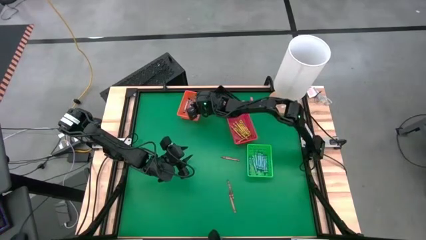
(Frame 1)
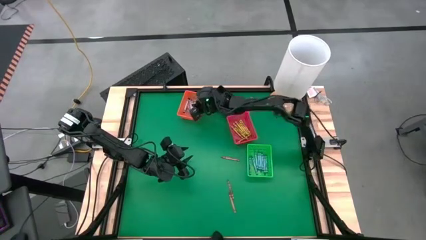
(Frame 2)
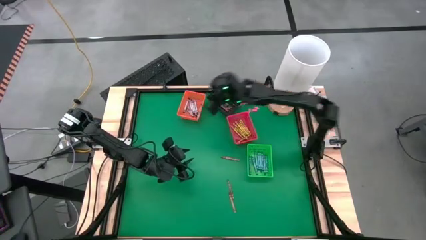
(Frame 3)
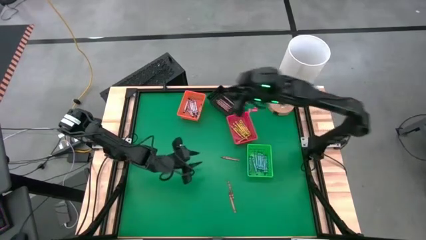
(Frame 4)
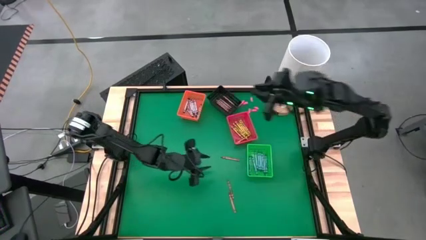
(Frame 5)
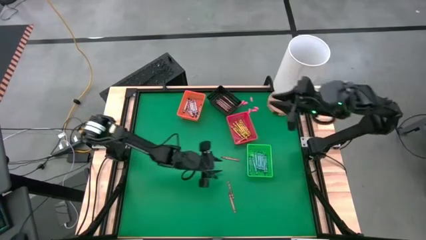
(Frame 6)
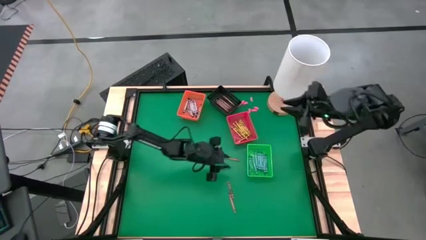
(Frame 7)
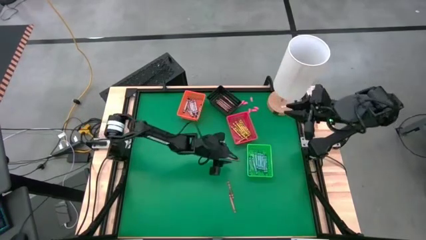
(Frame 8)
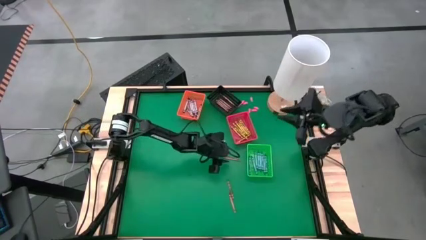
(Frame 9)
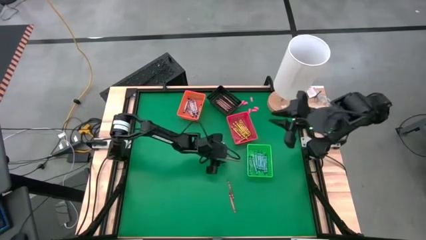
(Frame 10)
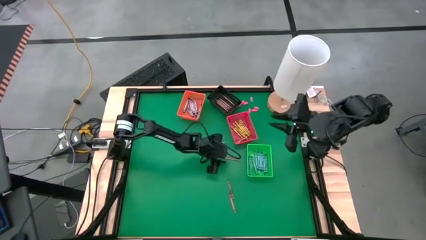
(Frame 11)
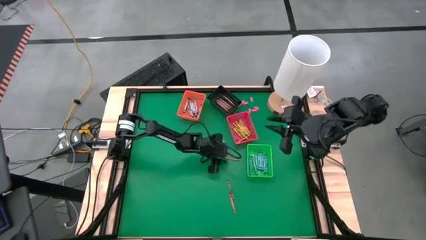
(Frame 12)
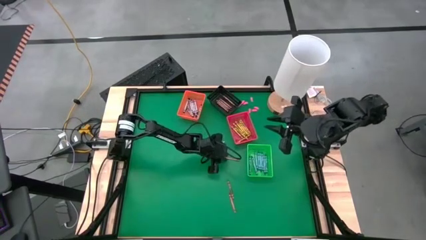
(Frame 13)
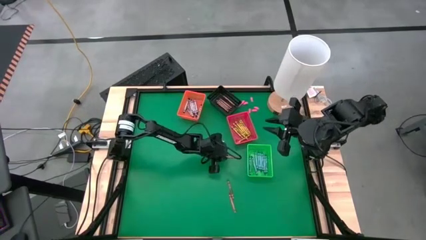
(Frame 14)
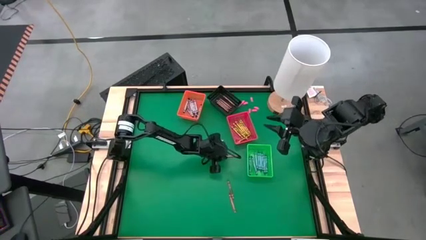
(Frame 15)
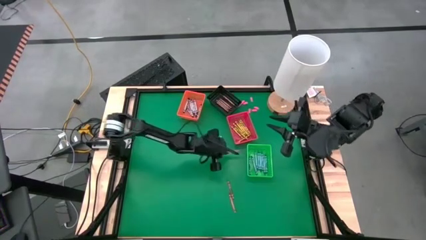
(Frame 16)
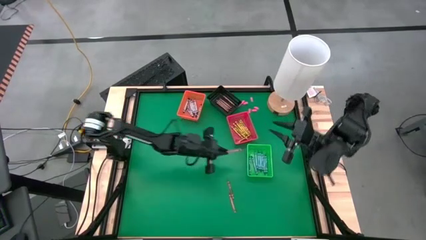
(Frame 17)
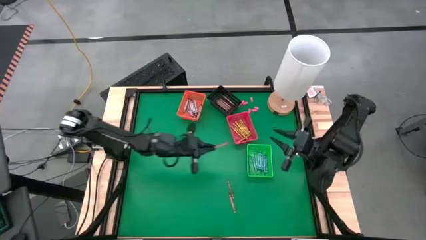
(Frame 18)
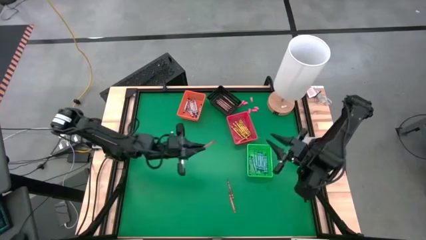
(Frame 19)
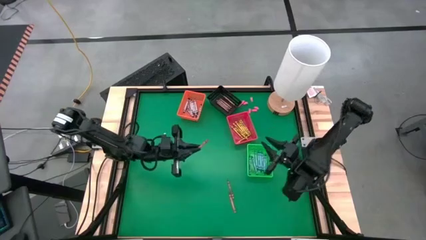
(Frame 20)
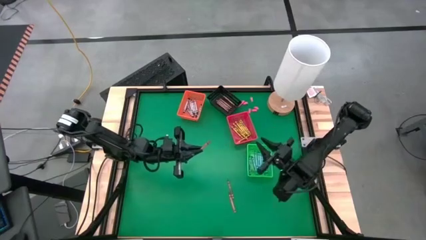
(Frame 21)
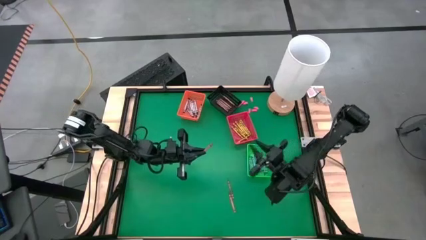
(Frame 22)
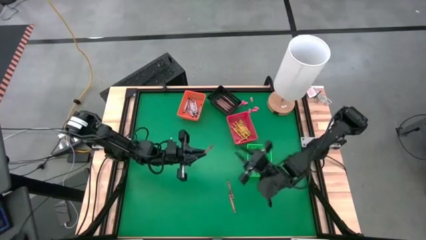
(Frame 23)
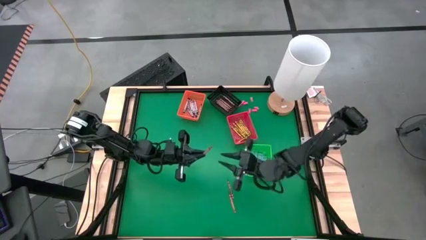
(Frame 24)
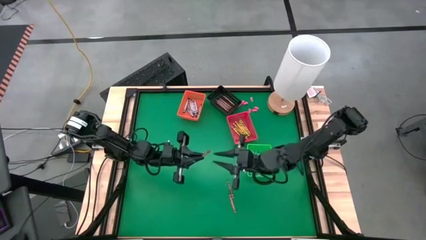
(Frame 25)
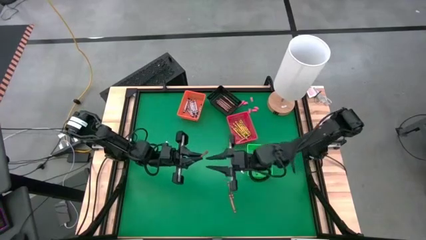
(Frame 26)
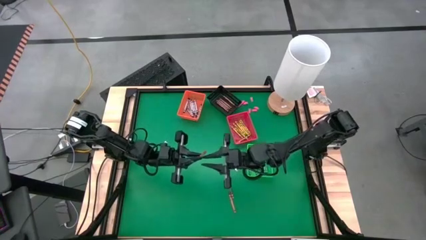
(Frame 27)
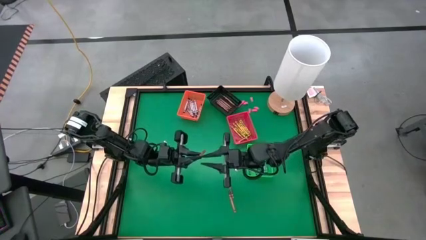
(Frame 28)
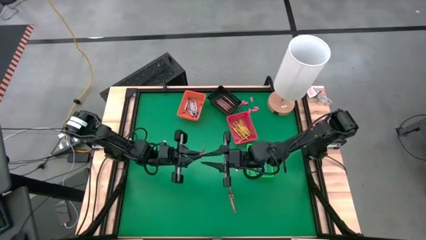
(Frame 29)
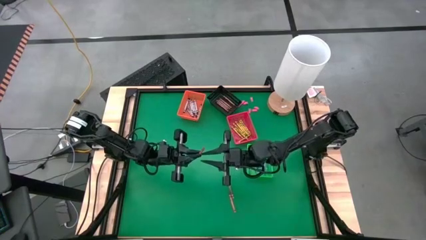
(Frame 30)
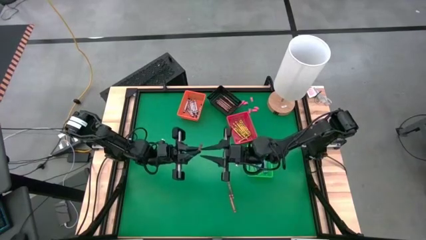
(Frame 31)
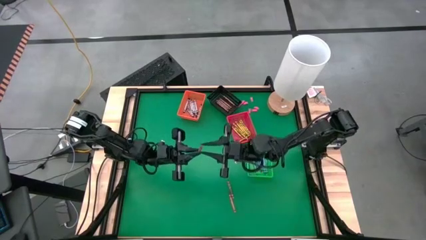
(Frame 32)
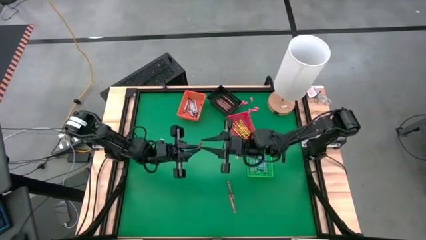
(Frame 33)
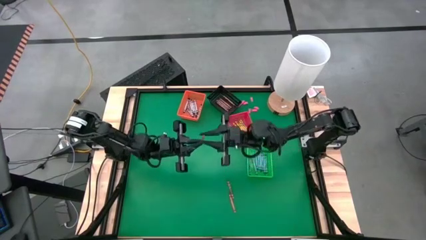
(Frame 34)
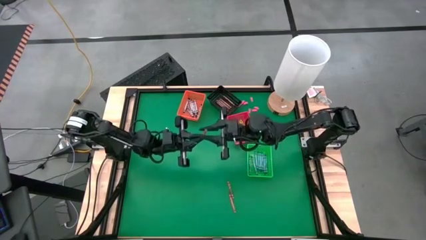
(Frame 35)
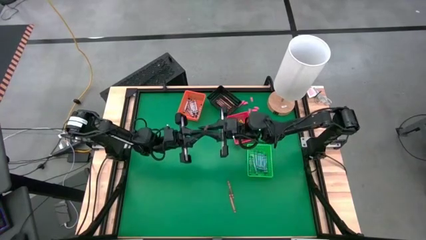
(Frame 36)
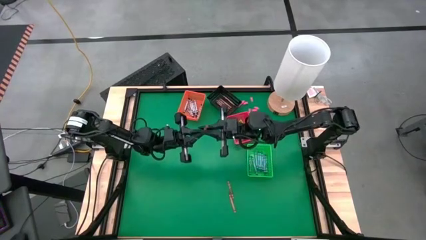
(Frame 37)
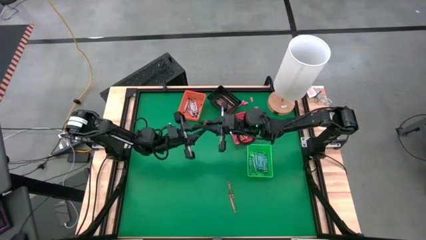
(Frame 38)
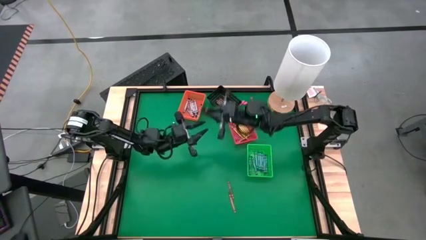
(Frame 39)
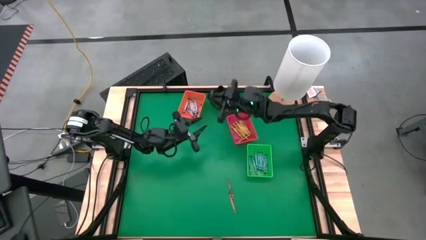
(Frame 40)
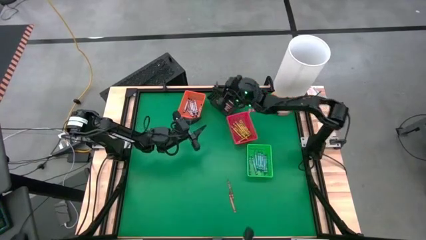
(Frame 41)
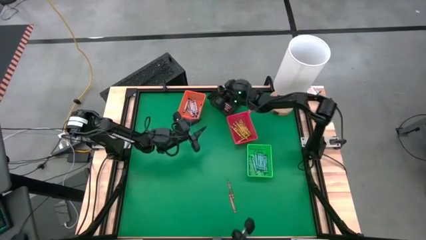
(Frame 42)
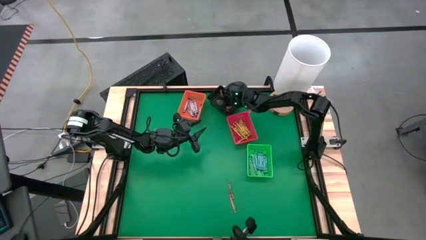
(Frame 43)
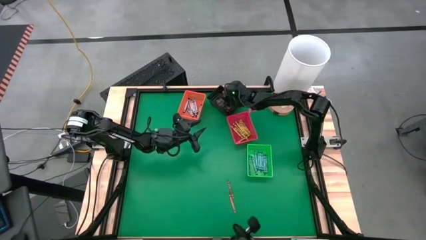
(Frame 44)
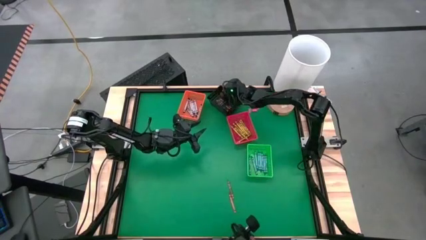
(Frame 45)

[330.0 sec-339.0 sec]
Task: Sort crayons
Put the black crayon into the orange bin

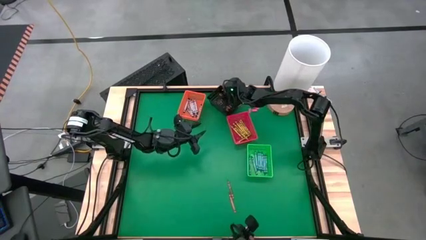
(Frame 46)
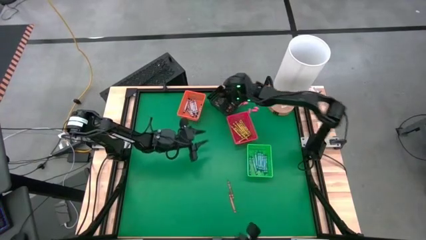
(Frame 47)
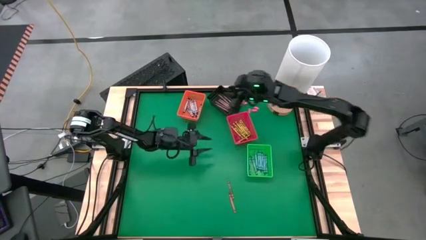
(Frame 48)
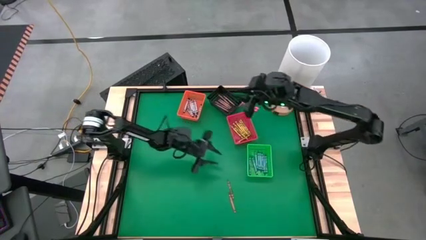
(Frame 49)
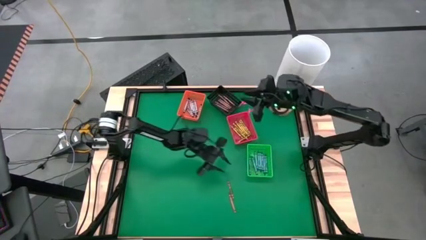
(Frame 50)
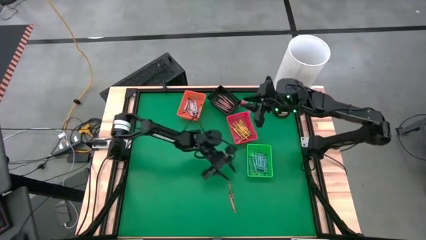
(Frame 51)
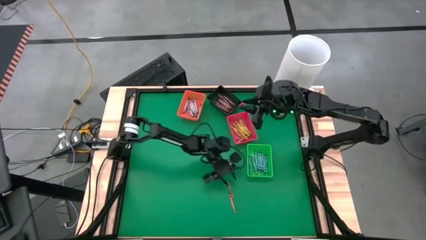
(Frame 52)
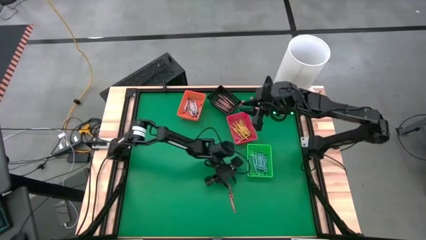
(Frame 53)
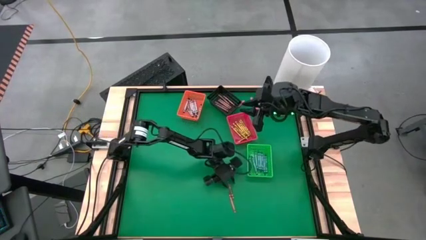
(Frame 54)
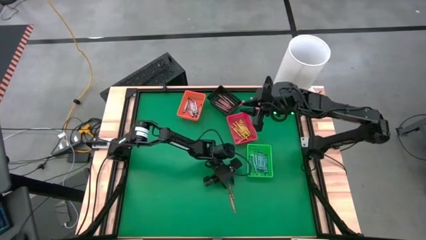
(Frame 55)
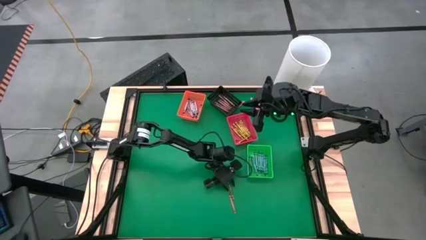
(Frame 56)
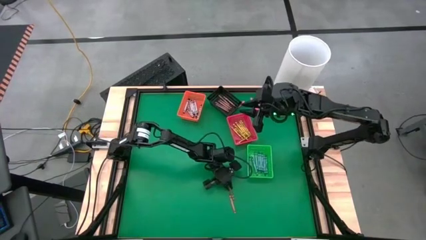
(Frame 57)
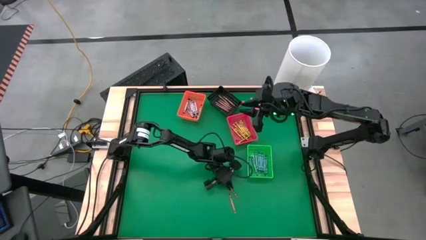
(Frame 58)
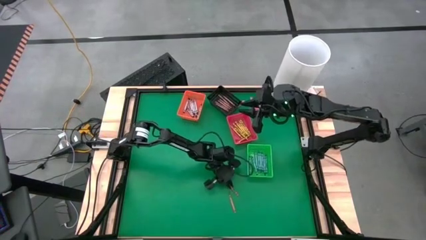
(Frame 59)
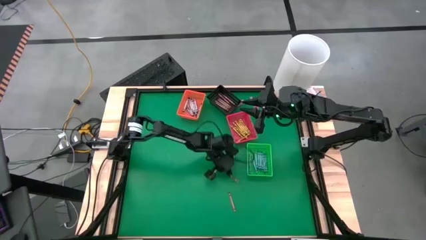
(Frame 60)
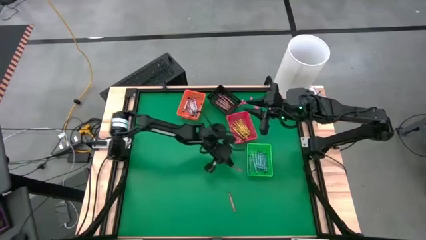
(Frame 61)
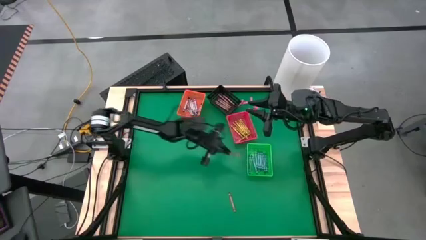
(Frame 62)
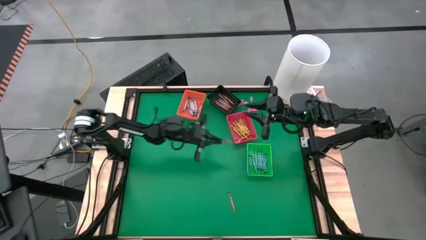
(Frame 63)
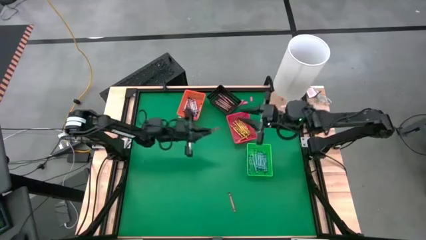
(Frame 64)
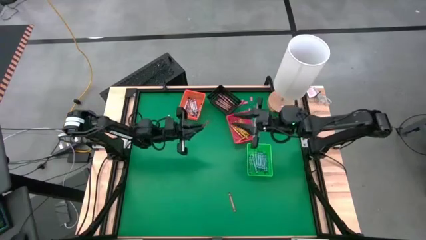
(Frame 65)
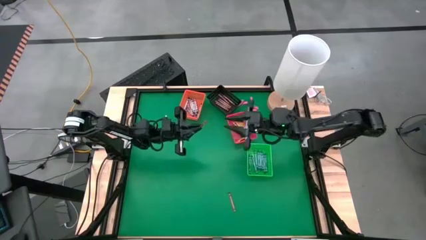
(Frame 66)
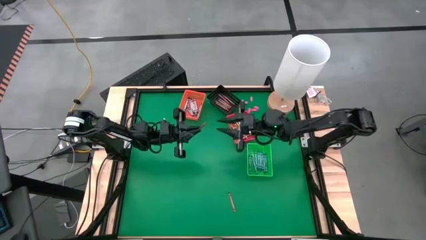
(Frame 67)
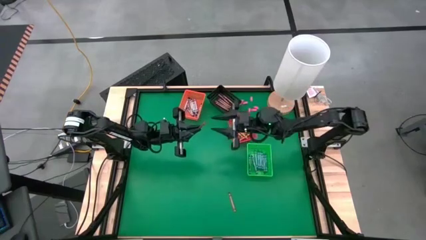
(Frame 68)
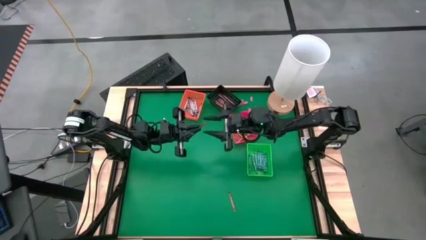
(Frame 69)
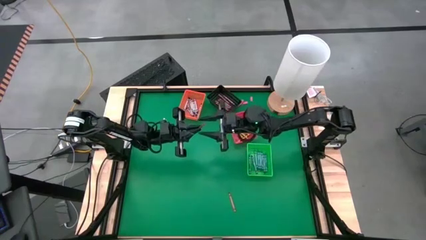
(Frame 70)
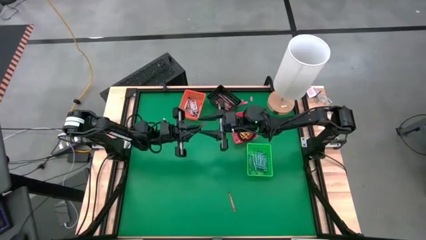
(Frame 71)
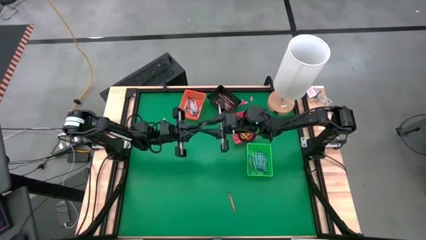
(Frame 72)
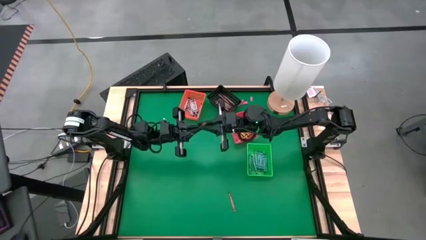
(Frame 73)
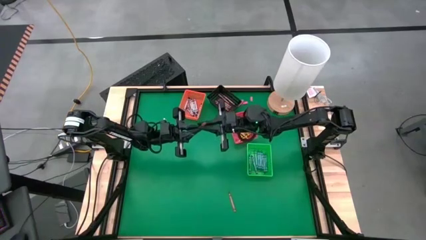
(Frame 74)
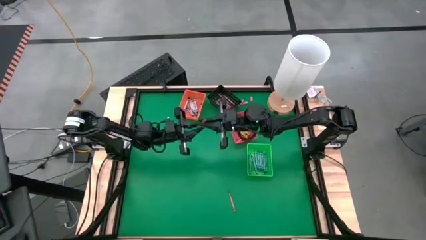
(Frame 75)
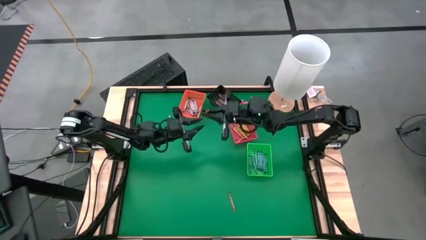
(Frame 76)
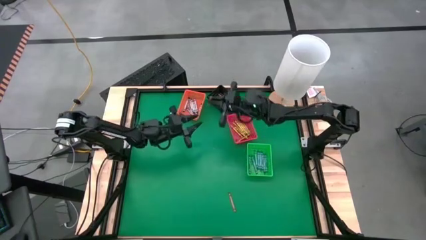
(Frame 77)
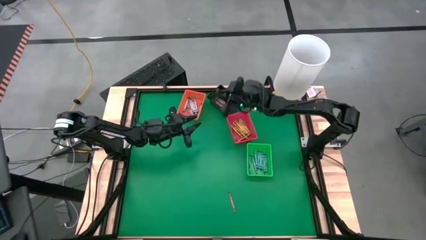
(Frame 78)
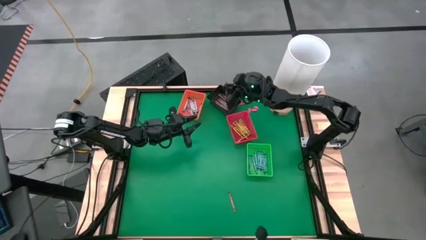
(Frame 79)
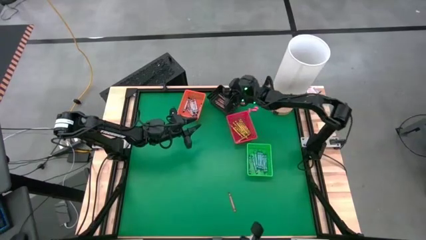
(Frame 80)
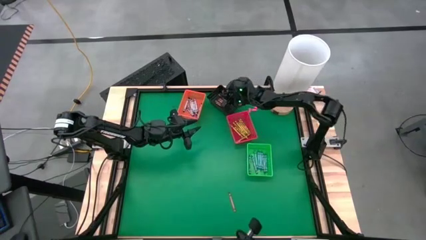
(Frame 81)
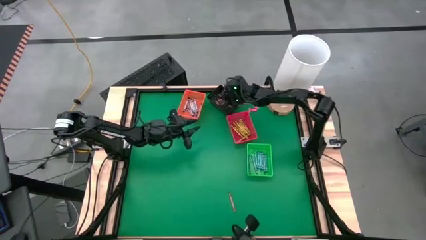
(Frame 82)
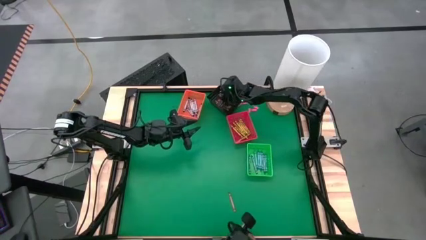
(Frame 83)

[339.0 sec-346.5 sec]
Put the brown crayon into the black bin
